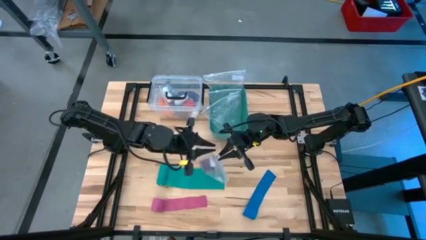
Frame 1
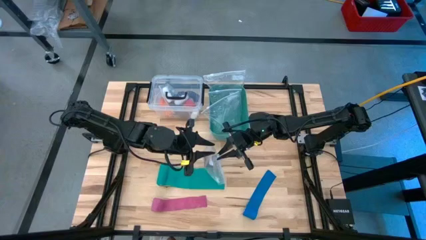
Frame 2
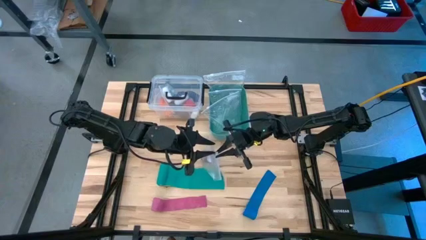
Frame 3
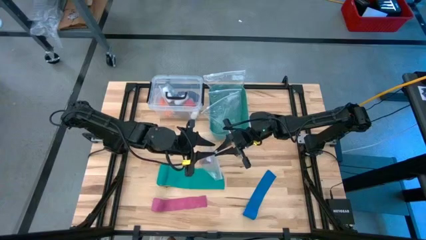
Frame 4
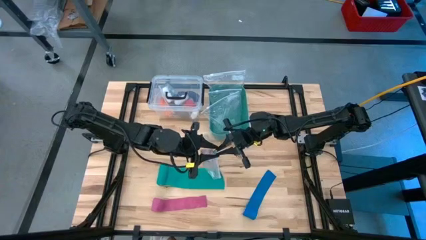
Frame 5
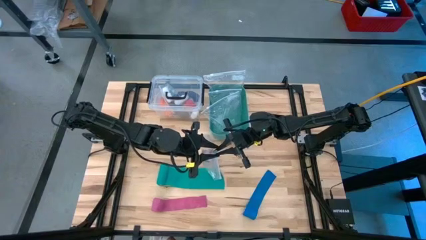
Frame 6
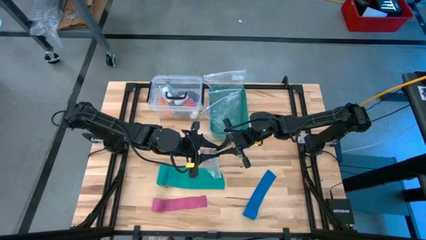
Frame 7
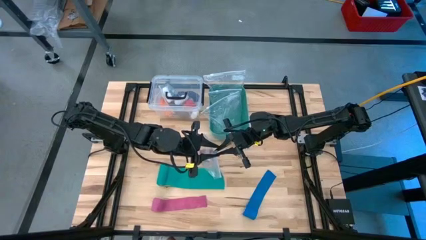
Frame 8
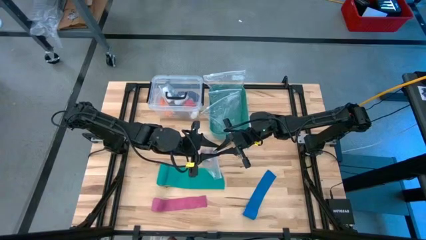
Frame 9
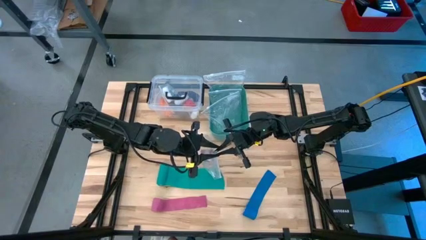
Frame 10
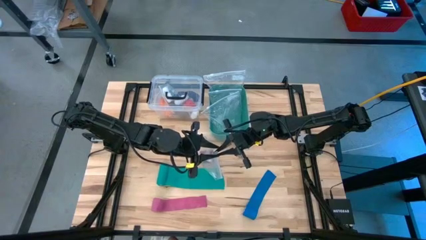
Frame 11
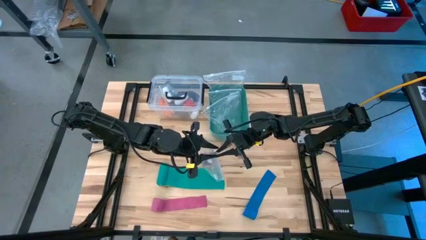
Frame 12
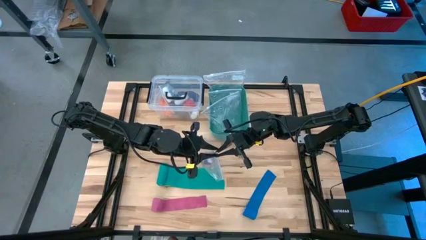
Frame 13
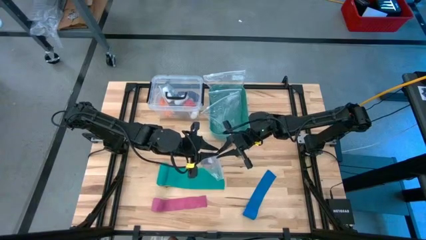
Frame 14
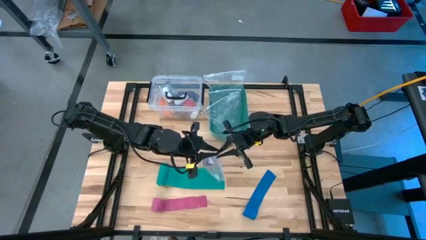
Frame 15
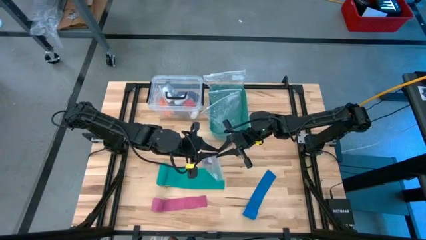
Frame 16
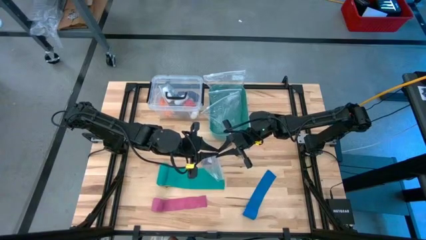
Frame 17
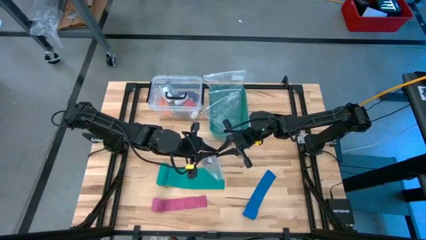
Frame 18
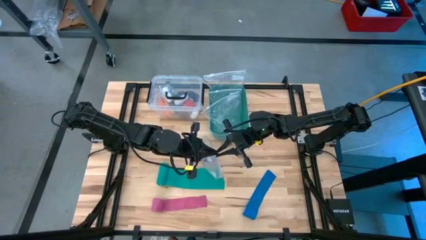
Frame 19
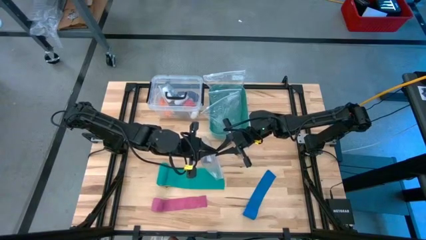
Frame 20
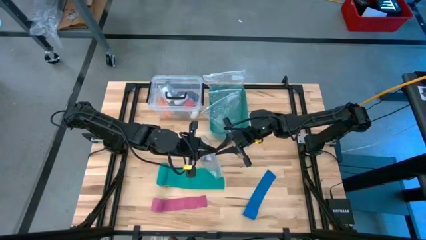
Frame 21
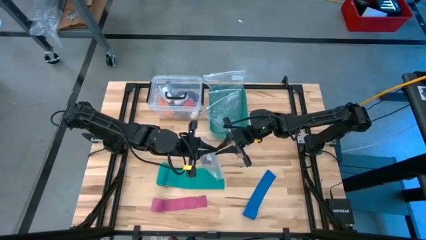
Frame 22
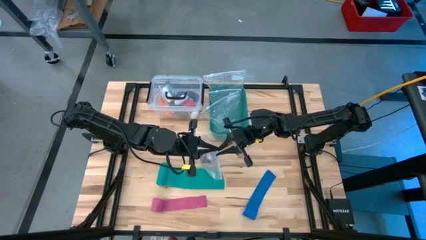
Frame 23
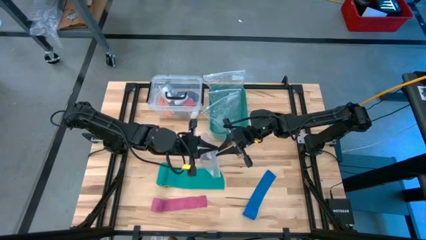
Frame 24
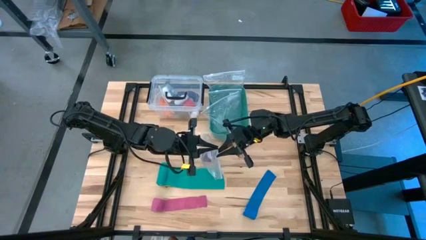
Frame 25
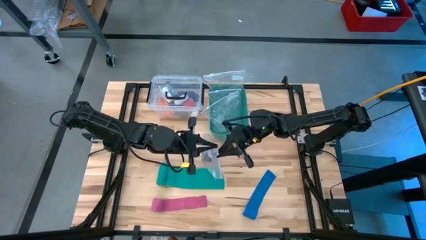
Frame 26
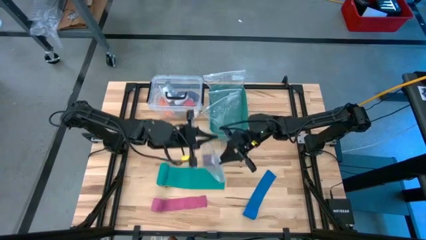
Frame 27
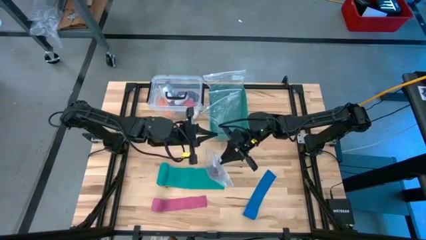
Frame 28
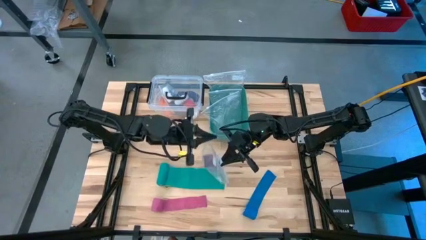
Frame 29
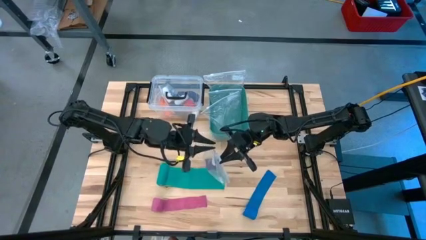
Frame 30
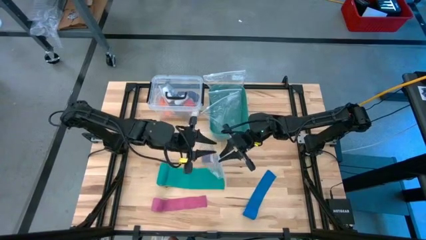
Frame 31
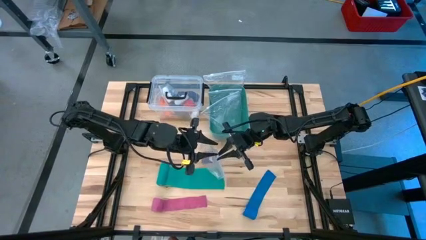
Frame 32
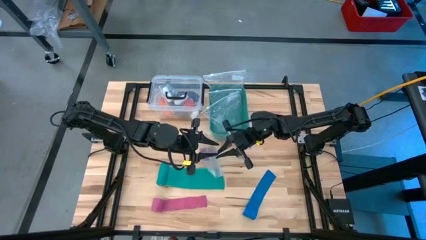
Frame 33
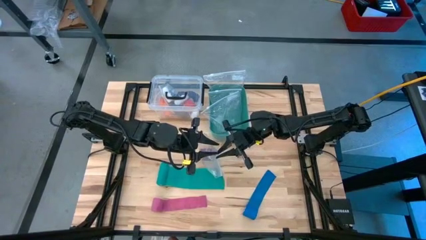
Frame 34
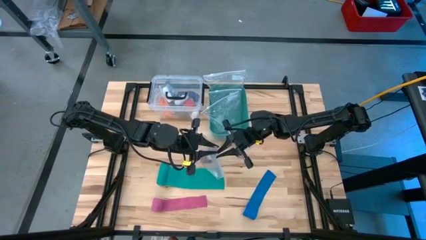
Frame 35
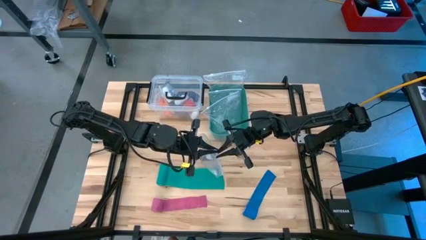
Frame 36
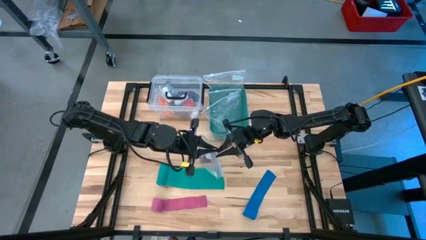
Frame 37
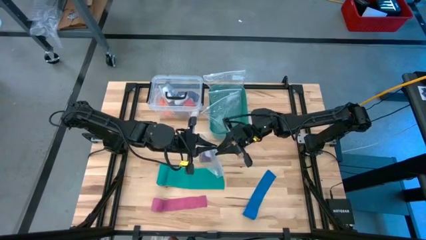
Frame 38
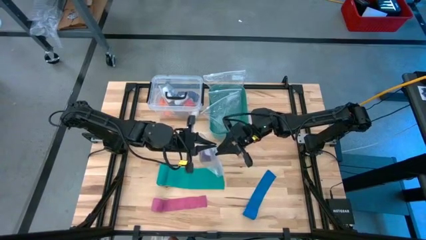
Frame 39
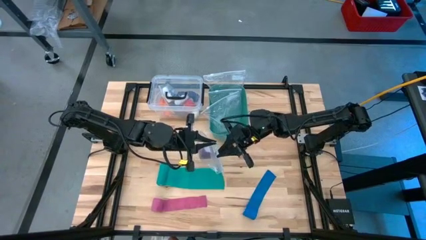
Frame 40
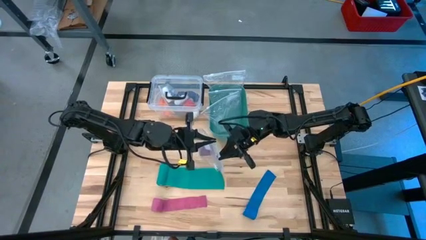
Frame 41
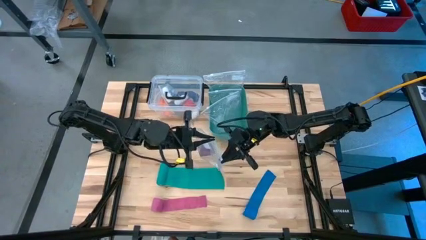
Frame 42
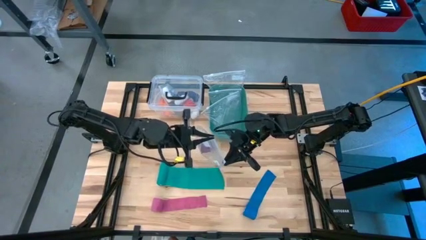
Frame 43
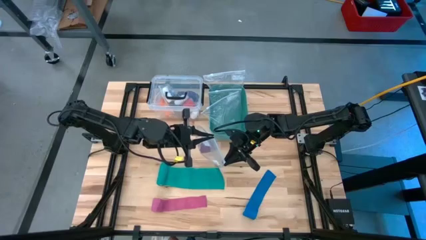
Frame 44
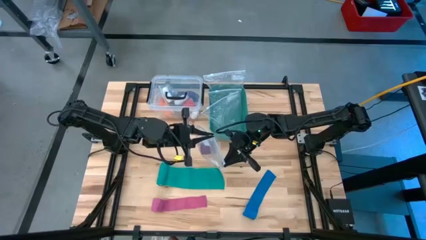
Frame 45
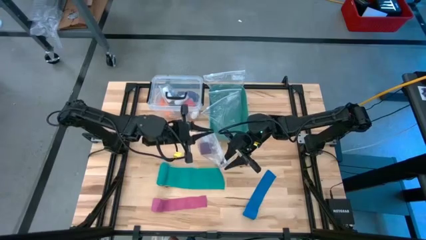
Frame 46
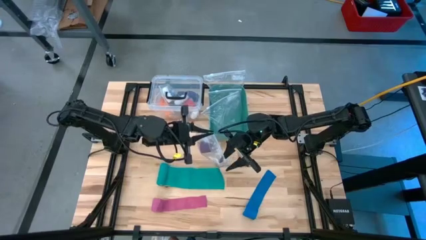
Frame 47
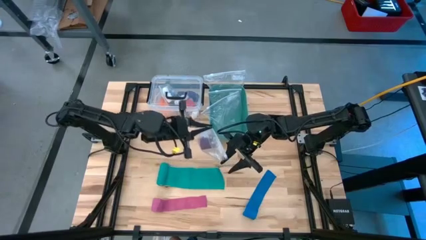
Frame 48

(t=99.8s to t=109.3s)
Task: Roll bandage
Close the transparent zip bag

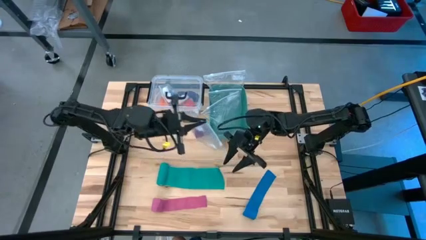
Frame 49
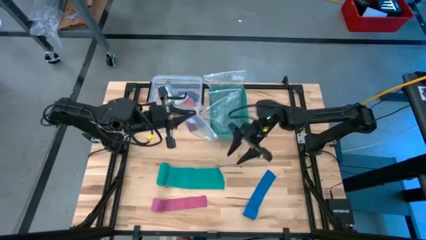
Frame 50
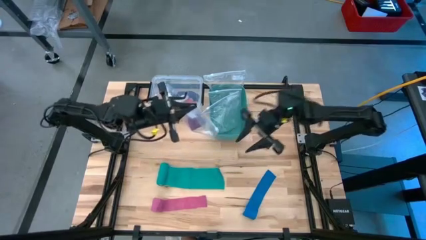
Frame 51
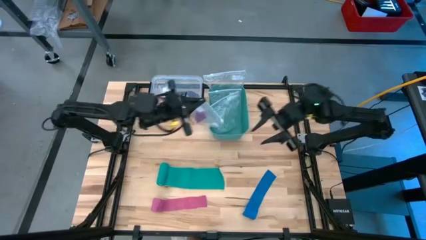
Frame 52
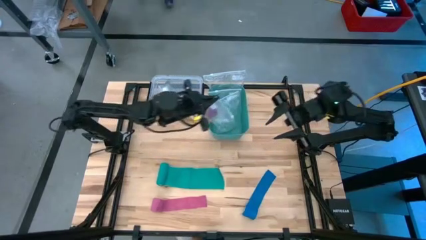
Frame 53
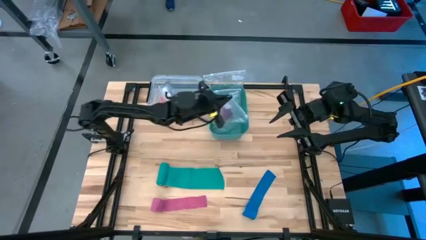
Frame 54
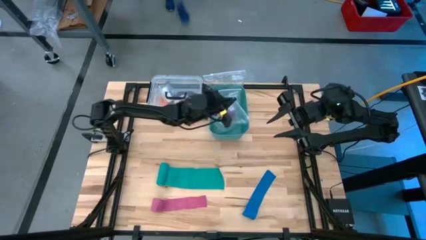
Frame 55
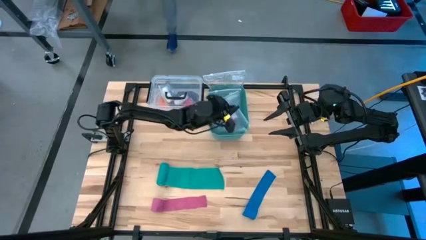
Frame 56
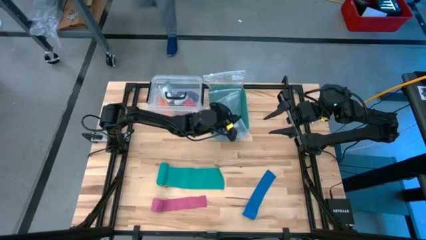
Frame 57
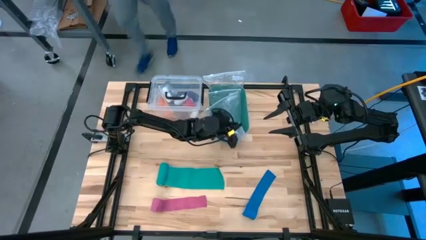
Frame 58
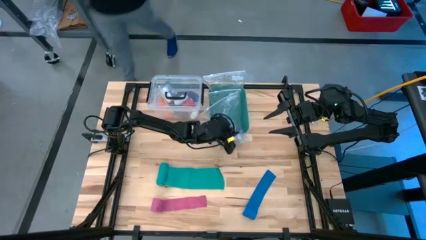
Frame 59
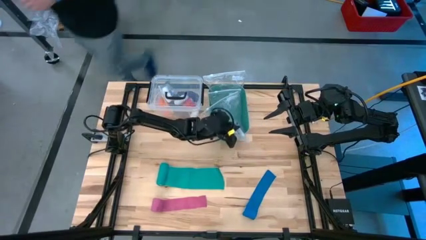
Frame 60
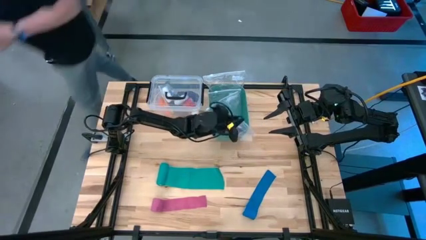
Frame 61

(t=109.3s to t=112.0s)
Put the transparent zip bag into the green bin

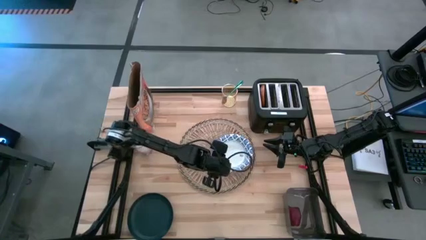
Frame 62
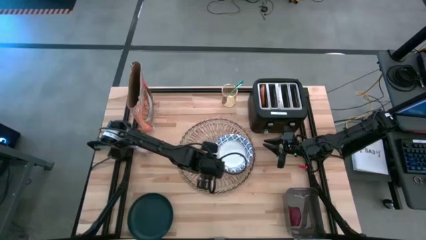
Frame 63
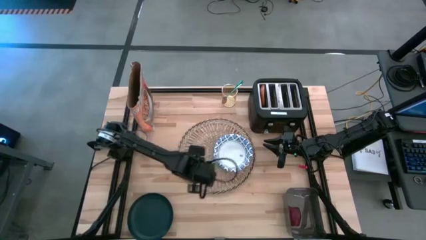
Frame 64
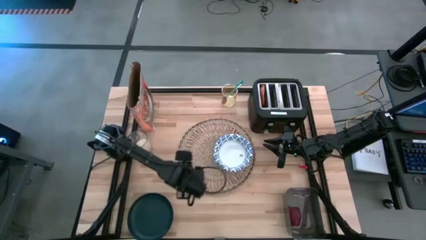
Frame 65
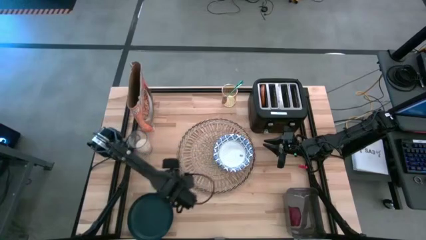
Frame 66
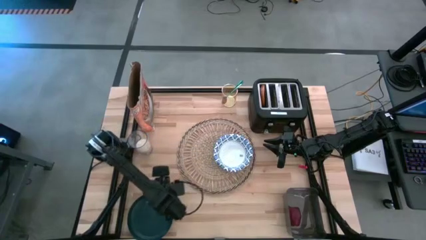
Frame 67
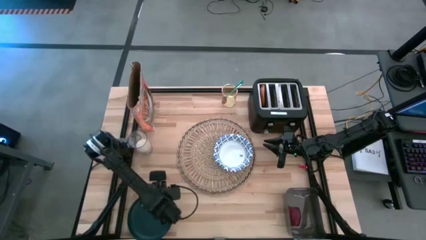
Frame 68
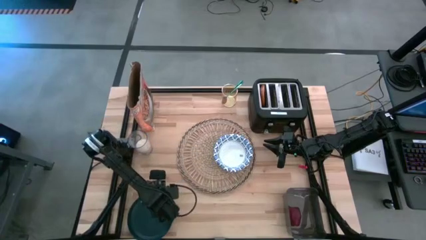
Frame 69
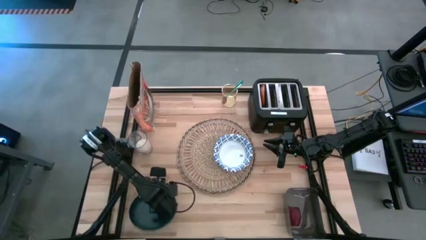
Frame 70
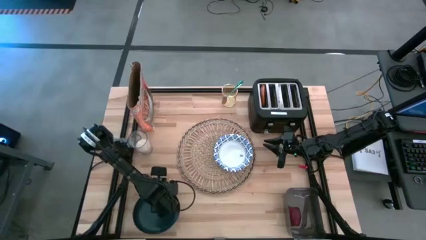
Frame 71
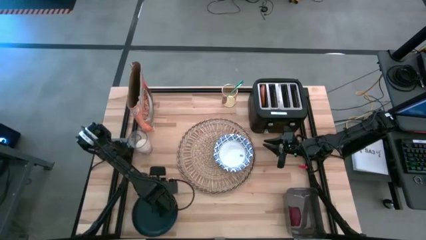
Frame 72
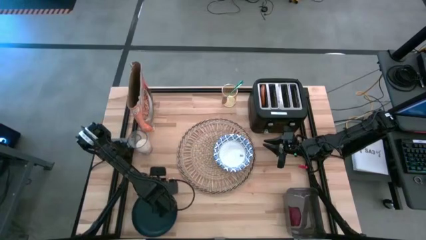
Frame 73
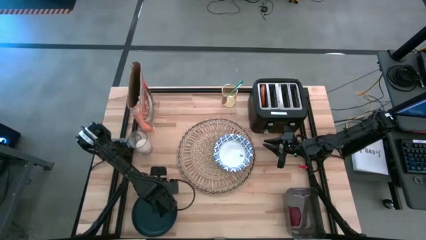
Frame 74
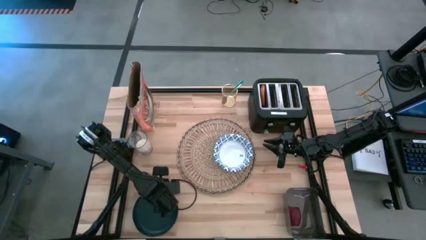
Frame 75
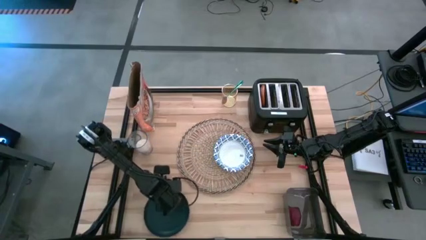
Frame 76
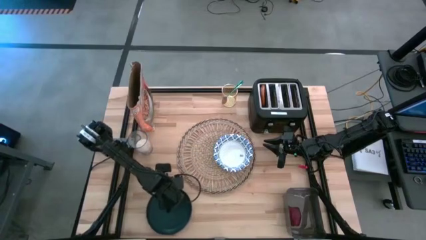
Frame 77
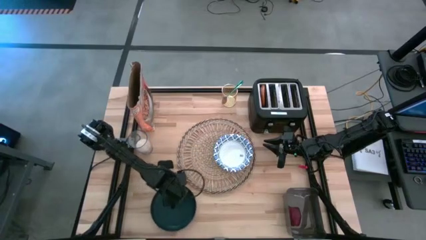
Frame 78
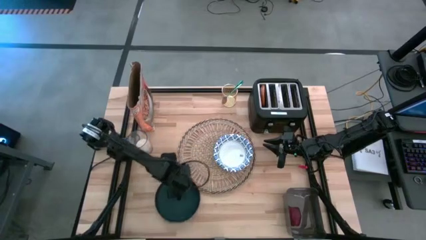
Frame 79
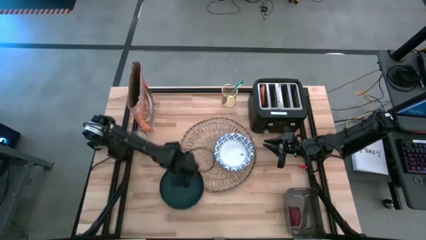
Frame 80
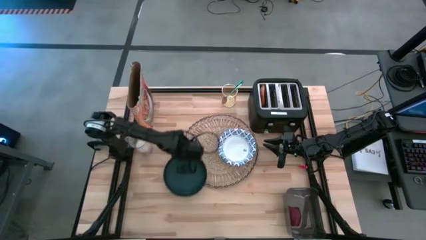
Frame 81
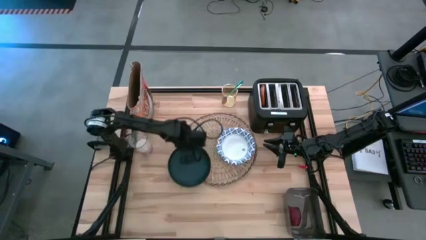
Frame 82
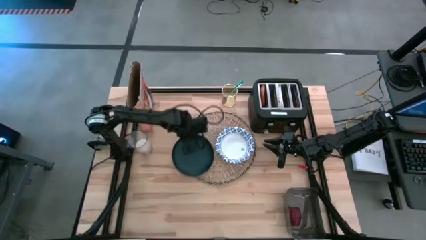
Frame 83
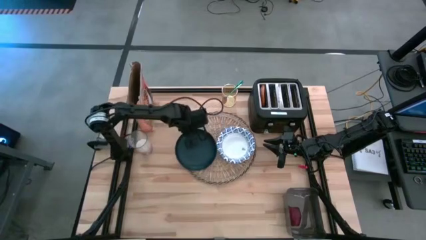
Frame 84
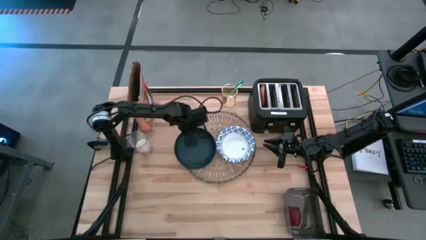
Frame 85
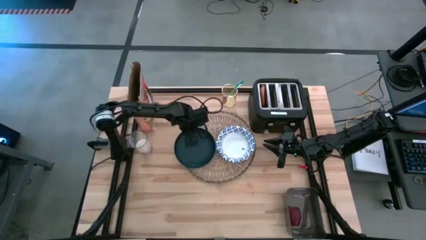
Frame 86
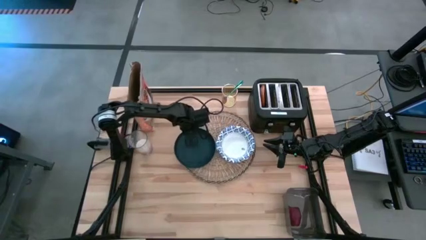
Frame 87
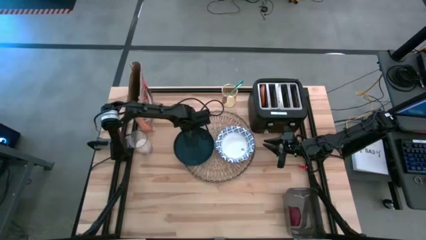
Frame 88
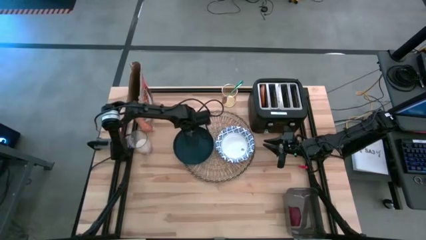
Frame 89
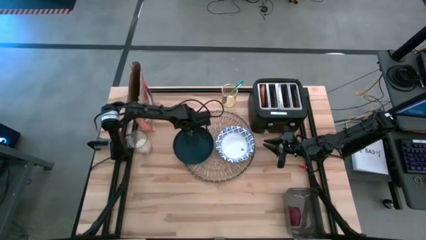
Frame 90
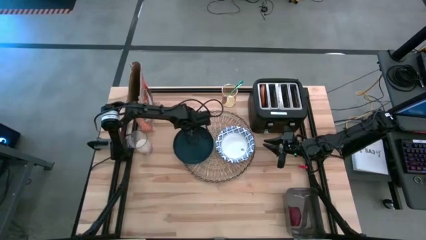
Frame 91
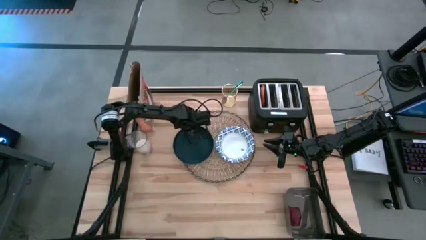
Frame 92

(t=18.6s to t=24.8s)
Task: Arrange a breakfast setting
Put the black plate to the left of the white bowl on the brown placemat
